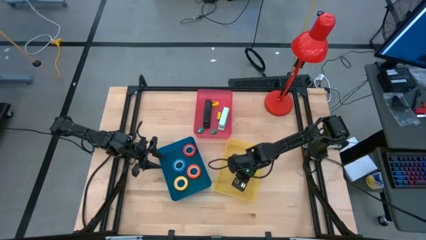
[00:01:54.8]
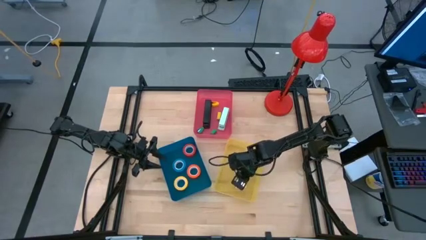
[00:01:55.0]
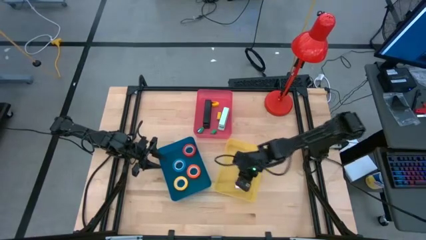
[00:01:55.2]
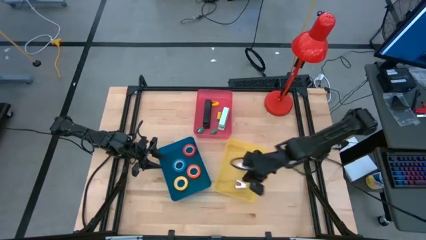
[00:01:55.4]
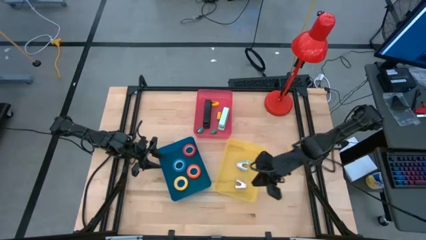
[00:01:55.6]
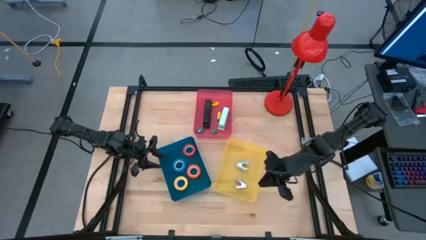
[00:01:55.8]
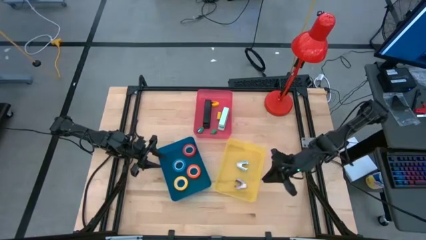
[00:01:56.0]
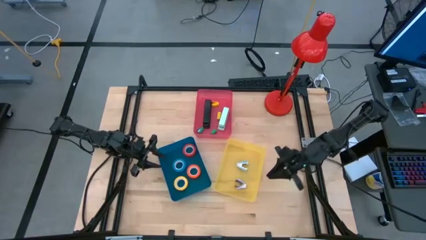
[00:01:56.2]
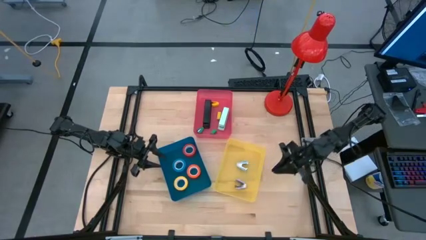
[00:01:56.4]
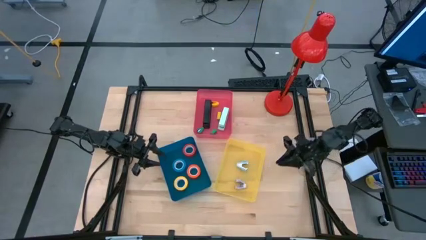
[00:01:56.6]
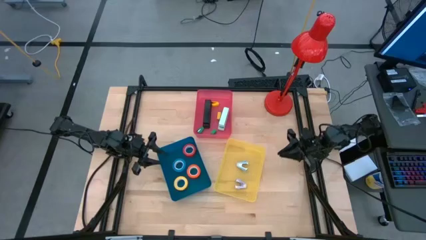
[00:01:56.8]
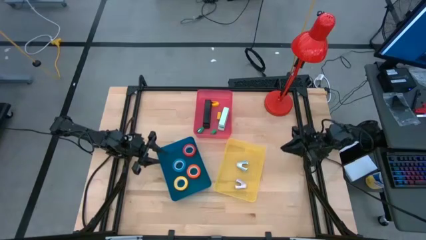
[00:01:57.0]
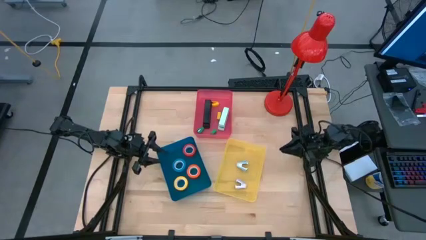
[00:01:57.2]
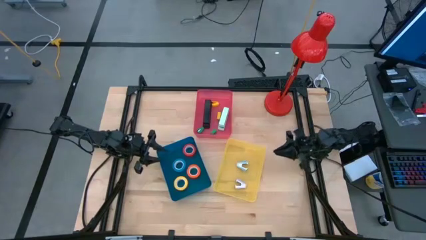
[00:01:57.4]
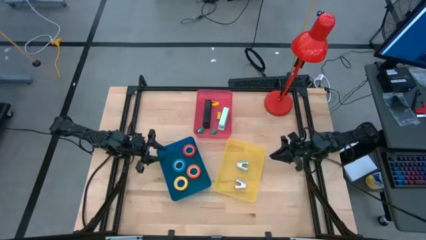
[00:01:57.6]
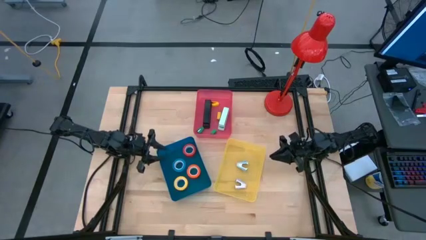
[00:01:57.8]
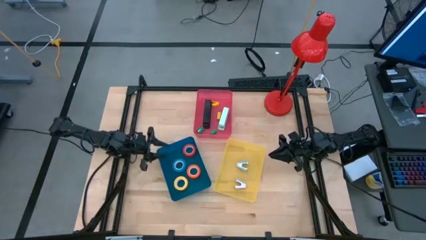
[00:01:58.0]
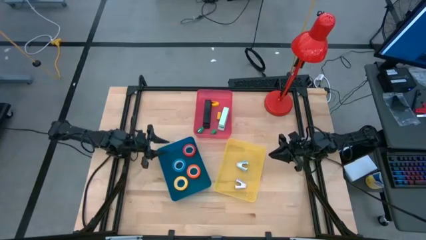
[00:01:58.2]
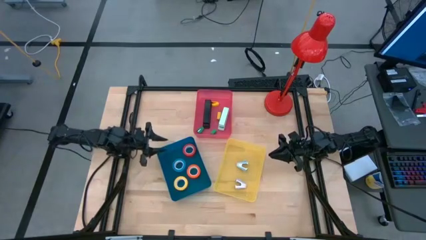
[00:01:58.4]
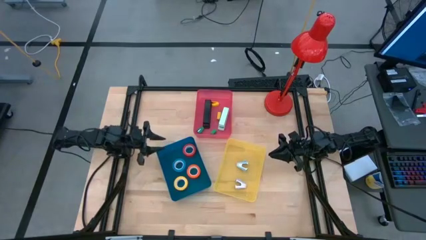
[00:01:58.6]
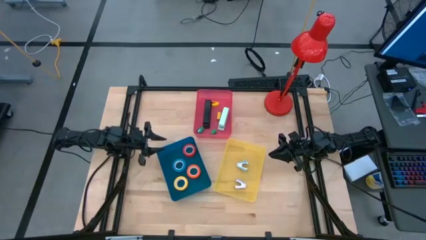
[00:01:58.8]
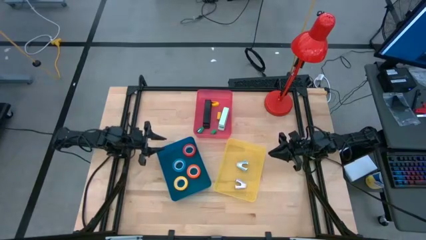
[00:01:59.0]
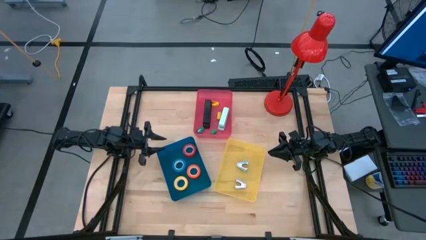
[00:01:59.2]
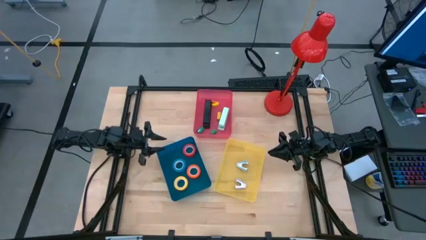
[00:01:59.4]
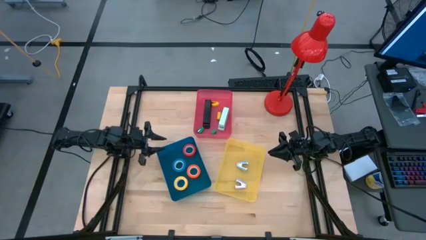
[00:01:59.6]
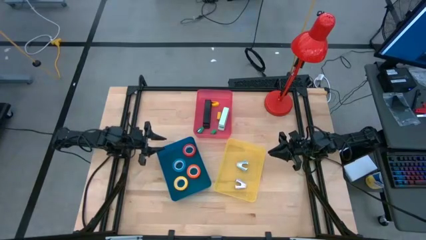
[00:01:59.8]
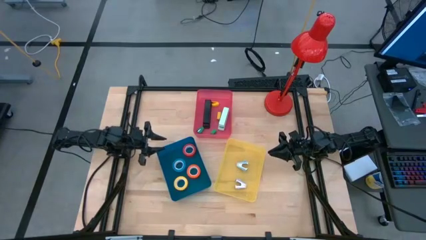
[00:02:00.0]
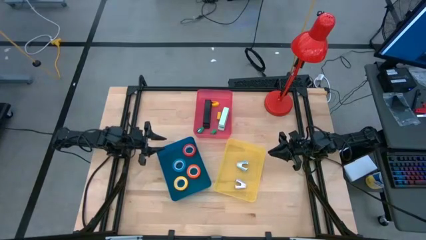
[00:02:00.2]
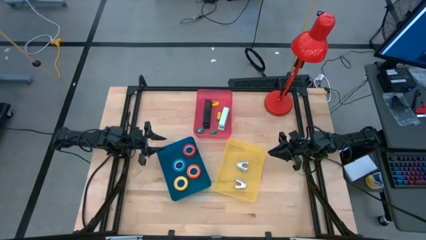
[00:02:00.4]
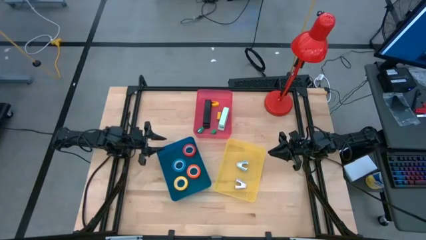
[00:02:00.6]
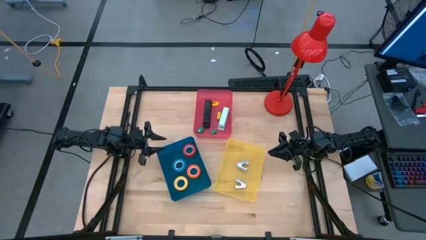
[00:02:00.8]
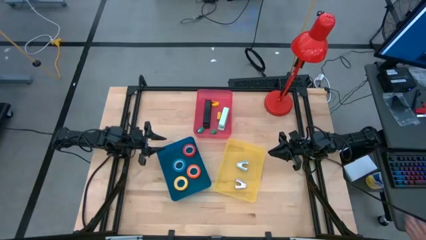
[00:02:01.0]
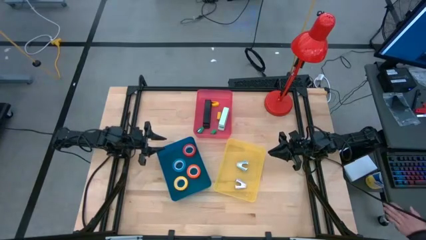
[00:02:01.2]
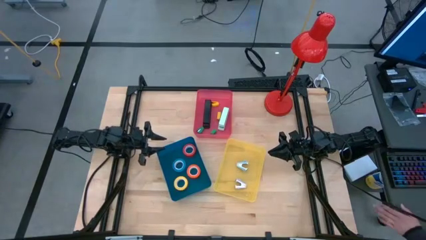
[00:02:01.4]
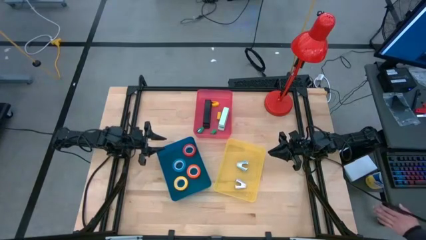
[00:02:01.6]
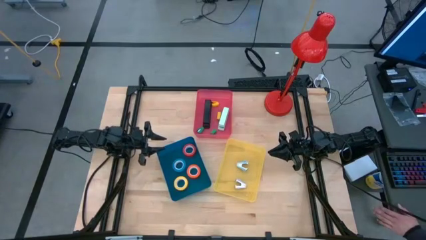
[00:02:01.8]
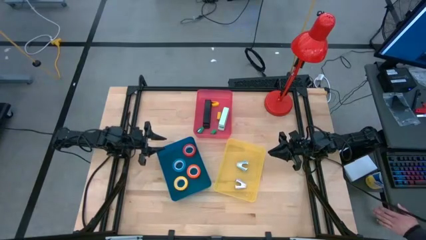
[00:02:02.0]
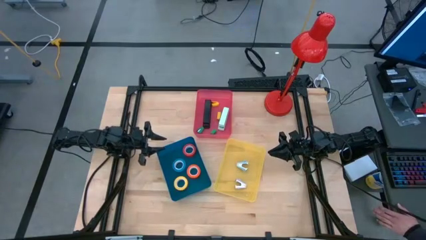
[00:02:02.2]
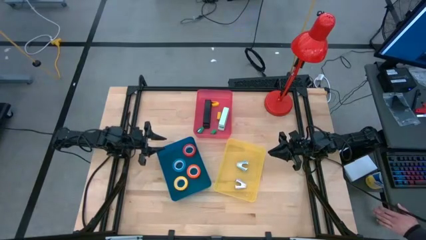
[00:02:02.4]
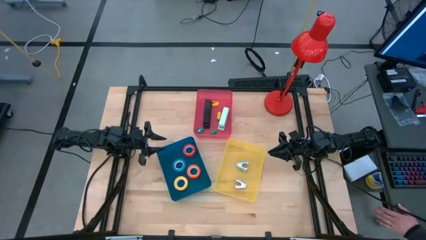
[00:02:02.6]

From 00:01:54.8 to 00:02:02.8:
Task: Pick and place Stapler, Stapler remover, tape
Return to Home Position

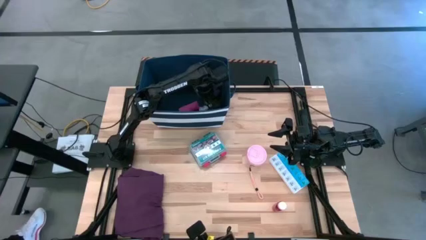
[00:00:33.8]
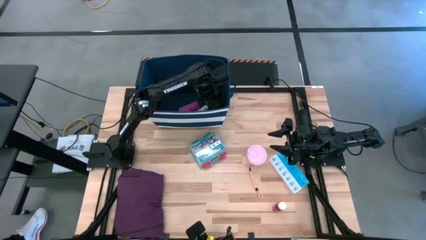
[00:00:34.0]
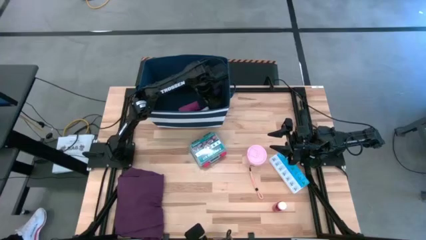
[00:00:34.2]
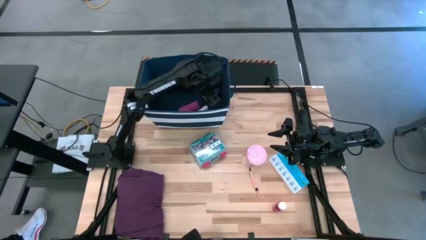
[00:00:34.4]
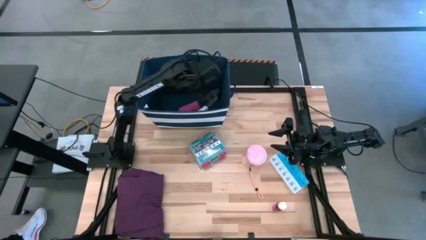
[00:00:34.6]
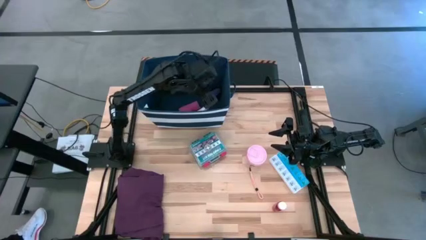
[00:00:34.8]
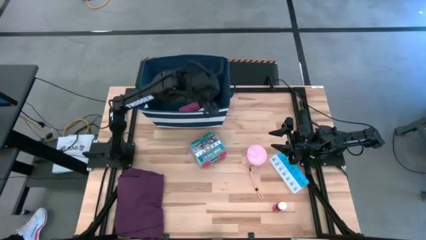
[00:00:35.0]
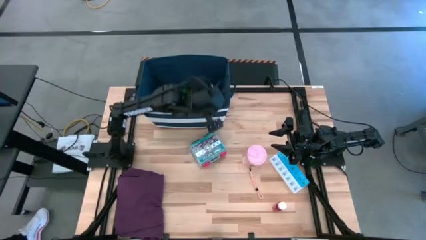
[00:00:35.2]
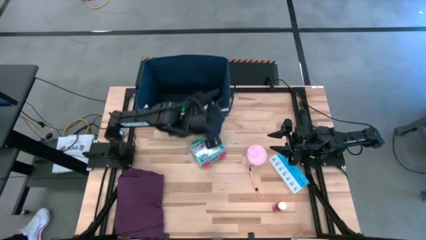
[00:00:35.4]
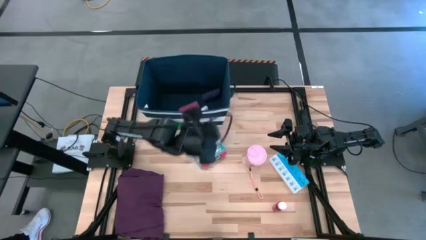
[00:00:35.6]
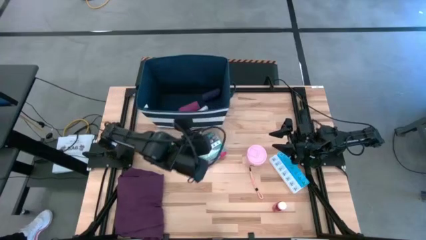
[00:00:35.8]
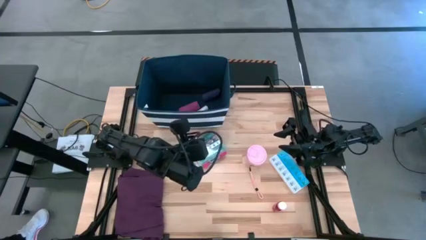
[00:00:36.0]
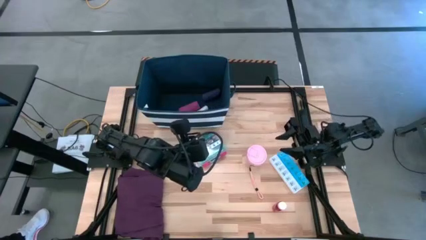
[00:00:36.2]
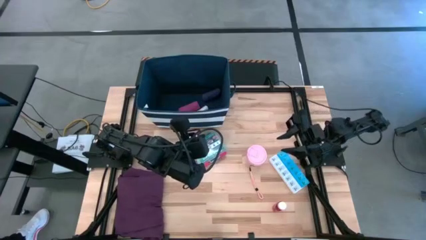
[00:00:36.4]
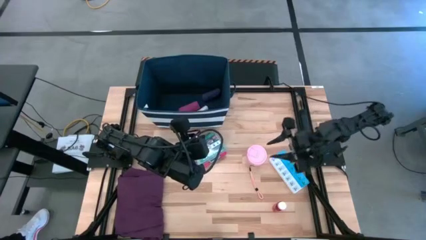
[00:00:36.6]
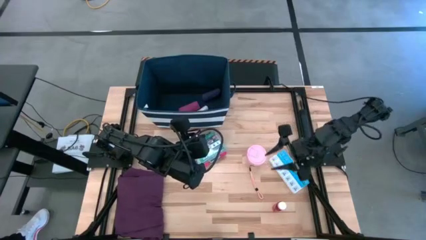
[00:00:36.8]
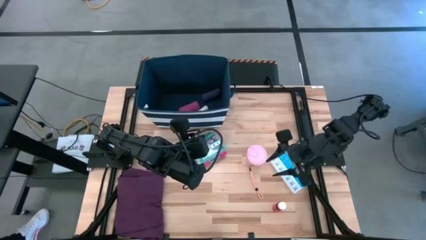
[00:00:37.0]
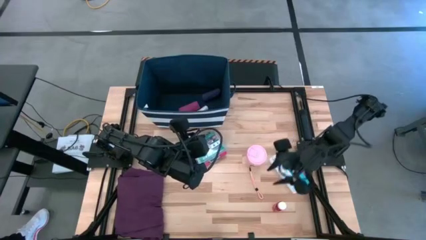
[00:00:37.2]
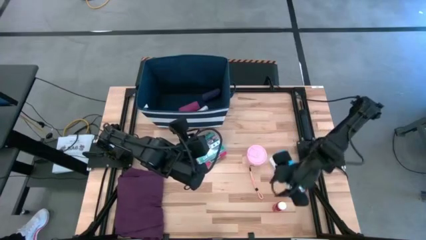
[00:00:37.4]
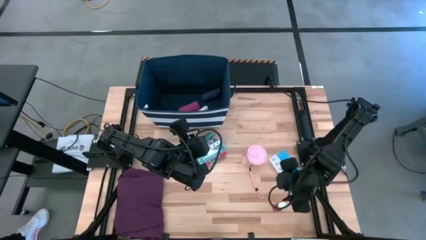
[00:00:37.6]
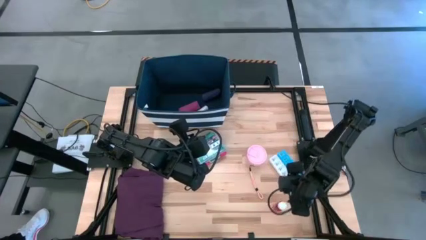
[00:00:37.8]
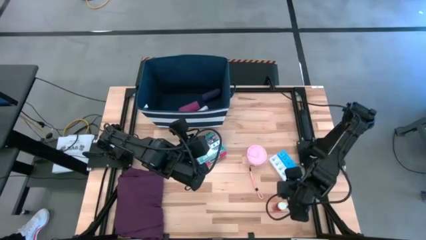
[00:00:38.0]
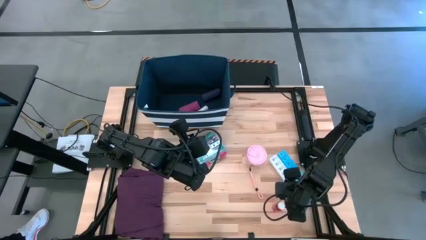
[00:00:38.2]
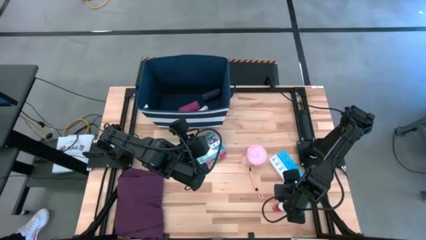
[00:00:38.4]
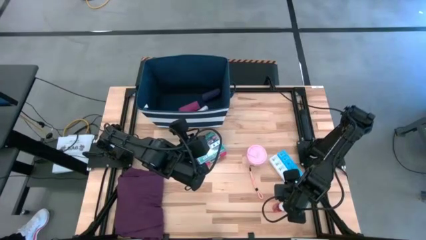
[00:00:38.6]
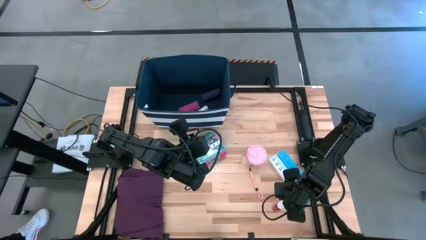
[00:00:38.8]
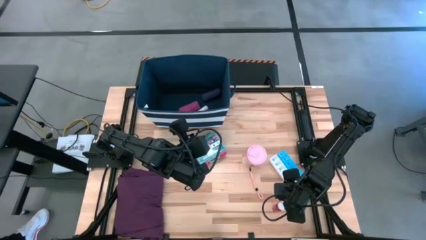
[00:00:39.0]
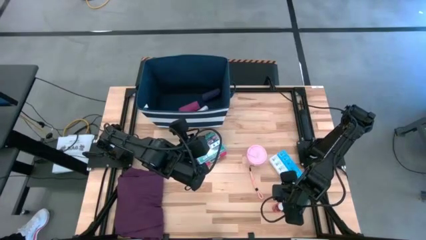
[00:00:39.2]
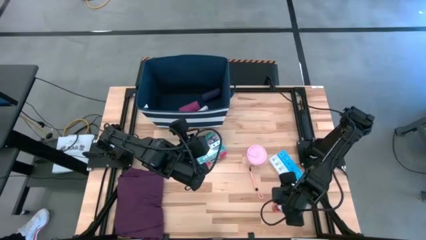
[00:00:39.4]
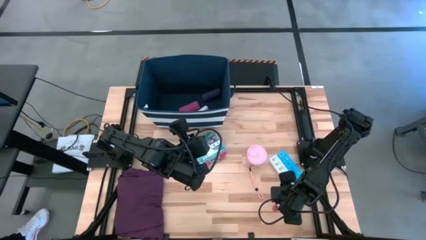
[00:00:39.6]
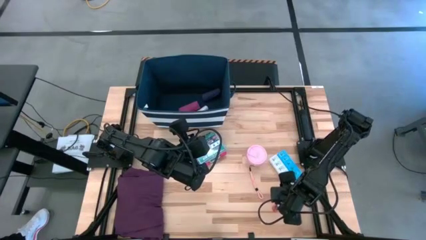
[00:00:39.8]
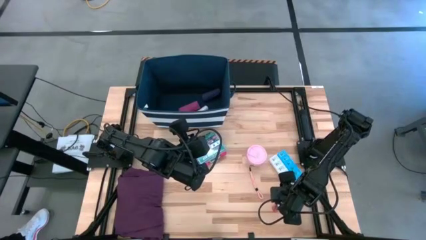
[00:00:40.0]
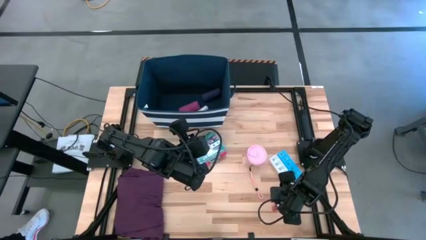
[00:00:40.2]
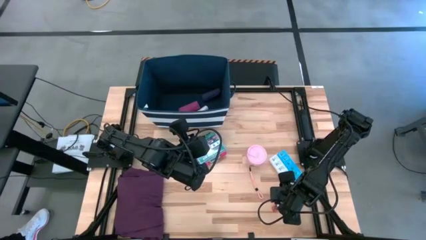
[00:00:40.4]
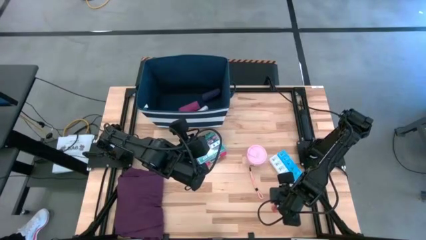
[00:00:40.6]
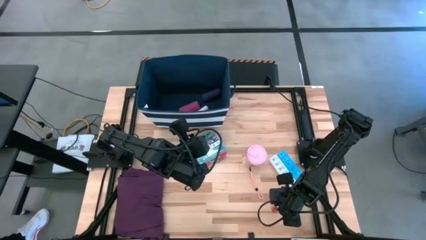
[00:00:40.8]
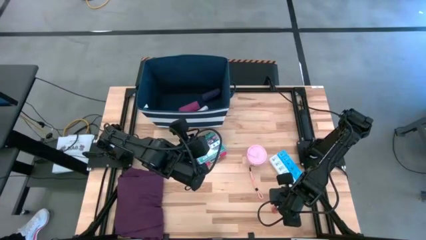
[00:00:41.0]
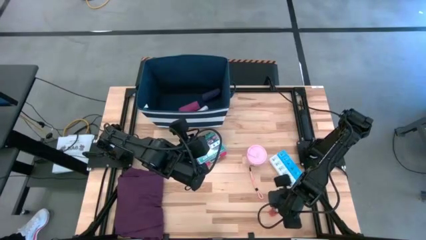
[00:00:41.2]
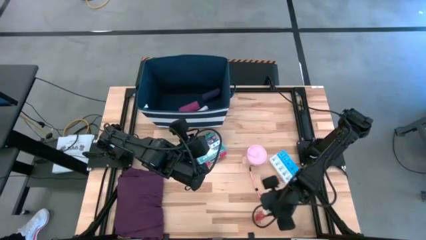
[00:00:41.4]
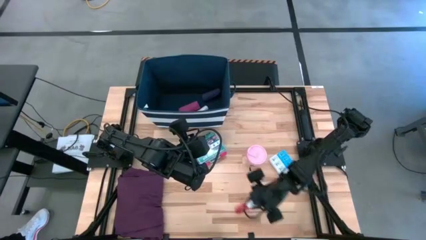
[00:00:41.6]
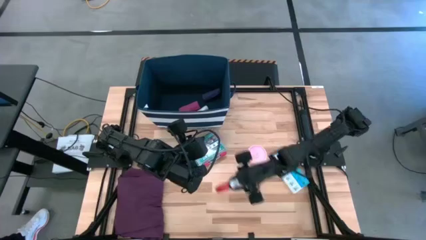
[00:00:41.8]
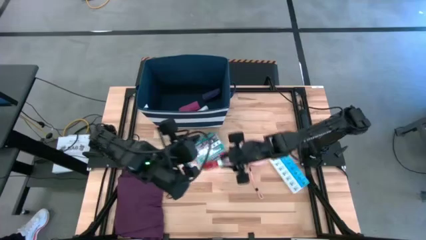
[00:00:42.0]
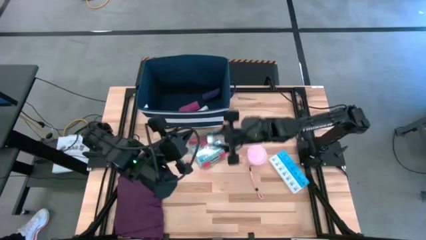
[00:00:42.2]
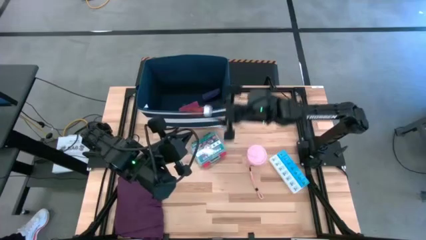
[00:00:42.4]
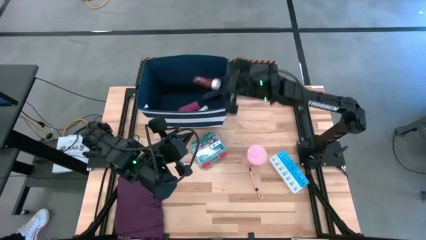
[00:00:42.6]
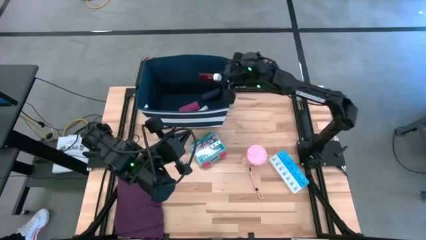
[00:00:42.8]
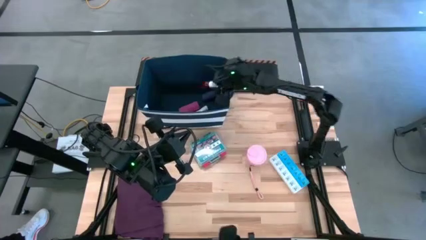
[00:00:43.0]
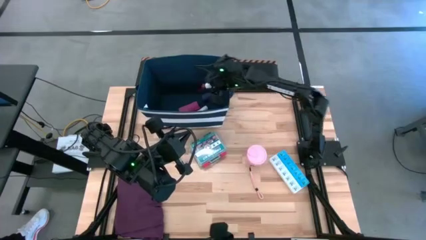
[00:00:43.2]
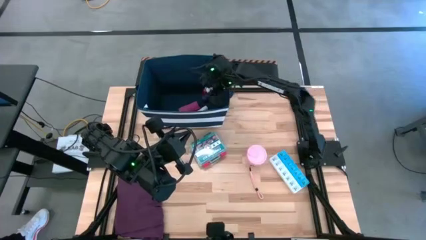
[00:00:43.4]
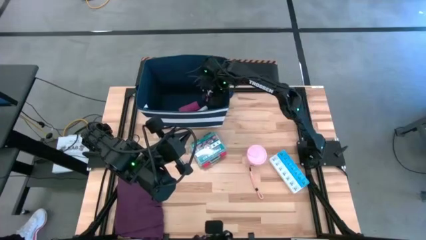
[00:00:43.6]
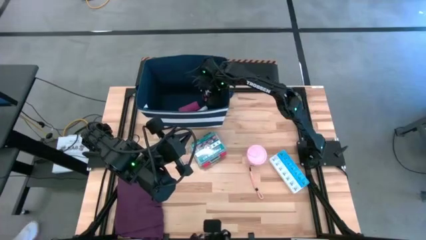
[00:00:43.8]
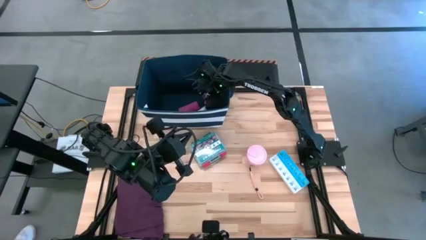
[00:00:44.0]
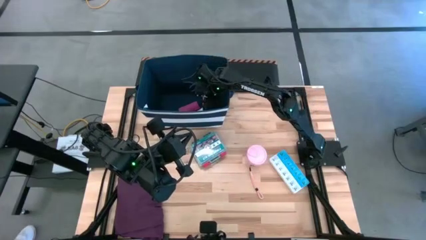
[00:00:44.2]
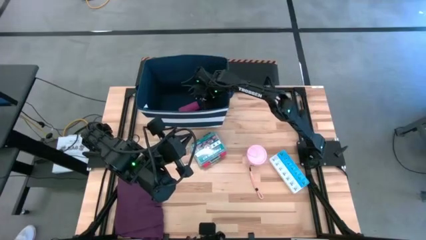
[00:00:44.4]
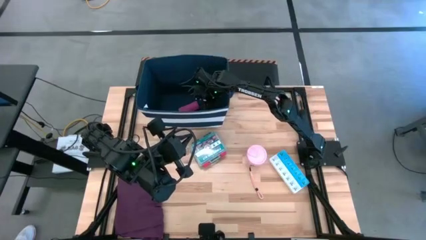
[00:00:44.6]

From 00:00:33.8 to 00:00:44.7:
Task: Pick & place medical supplies in basket/bin
Put the red pill bottle into the blue bin
